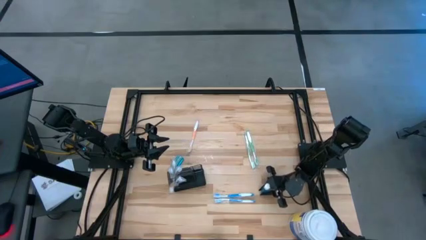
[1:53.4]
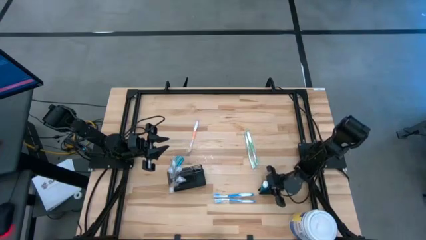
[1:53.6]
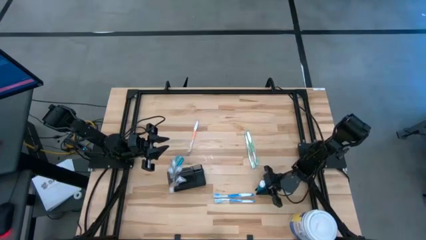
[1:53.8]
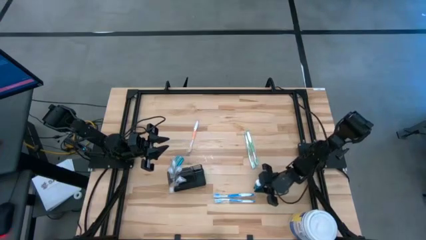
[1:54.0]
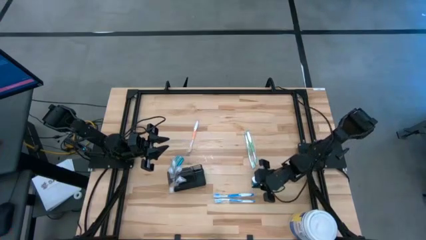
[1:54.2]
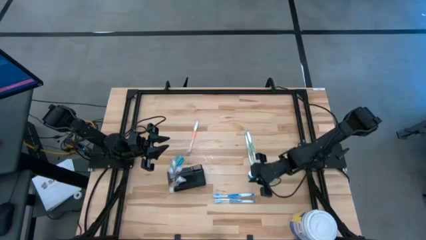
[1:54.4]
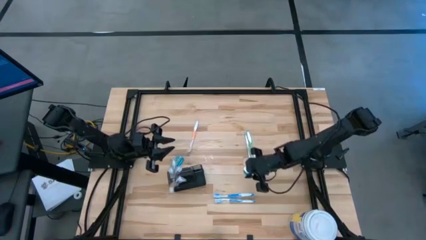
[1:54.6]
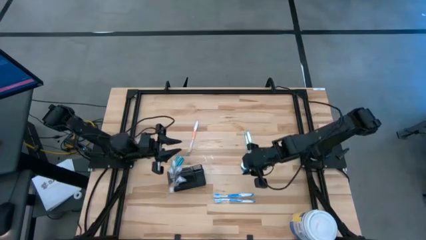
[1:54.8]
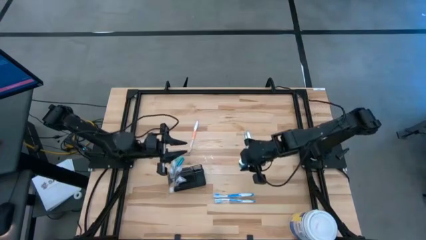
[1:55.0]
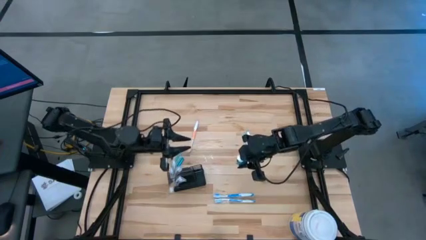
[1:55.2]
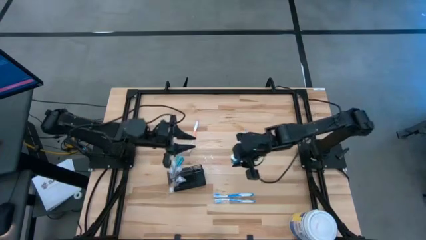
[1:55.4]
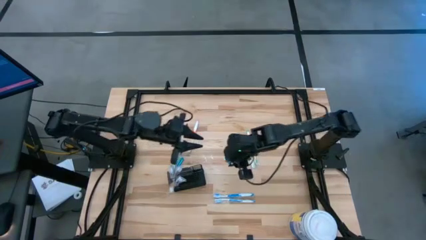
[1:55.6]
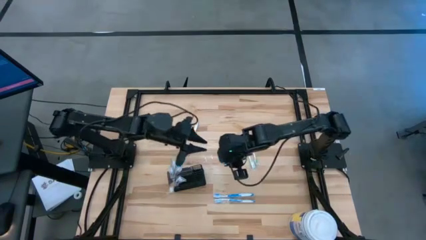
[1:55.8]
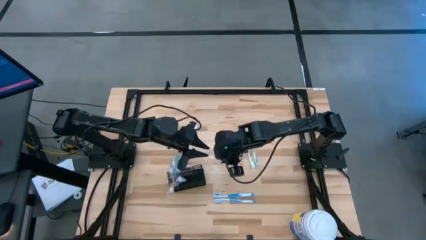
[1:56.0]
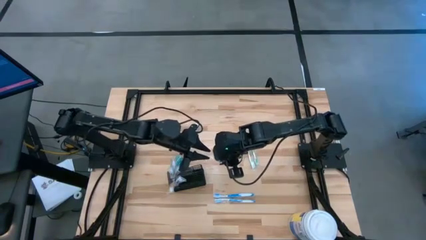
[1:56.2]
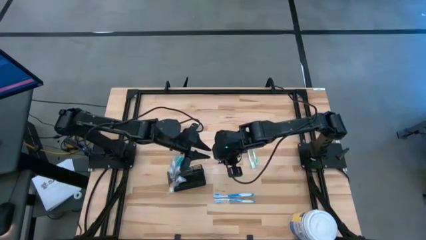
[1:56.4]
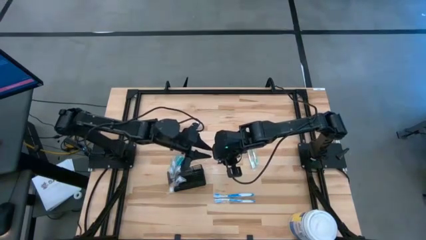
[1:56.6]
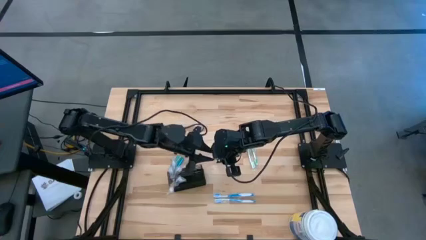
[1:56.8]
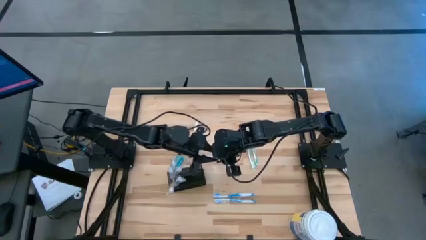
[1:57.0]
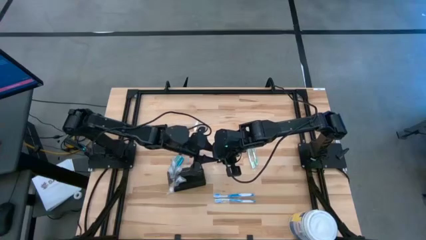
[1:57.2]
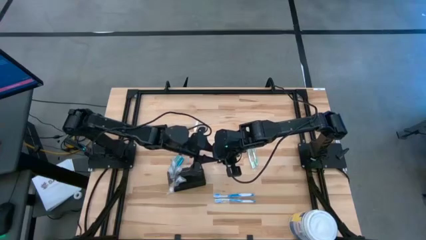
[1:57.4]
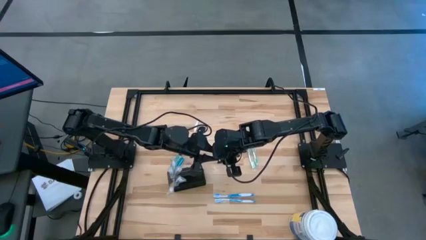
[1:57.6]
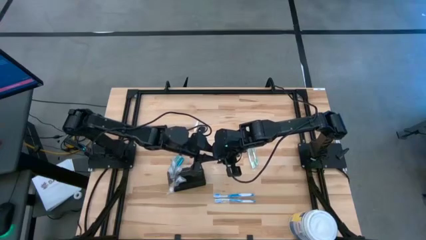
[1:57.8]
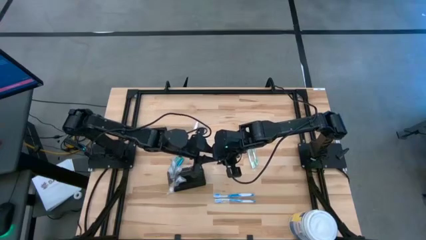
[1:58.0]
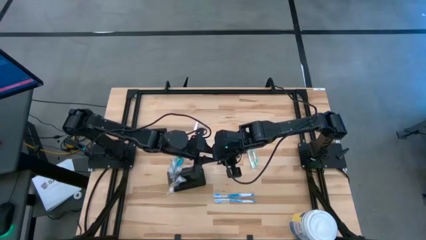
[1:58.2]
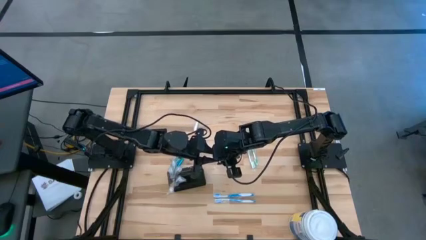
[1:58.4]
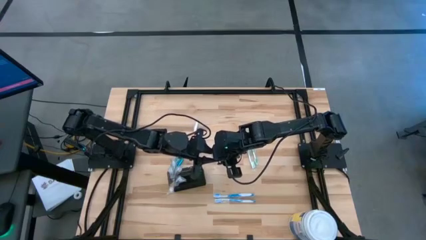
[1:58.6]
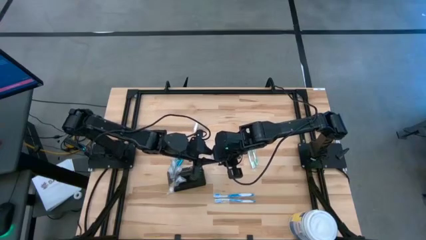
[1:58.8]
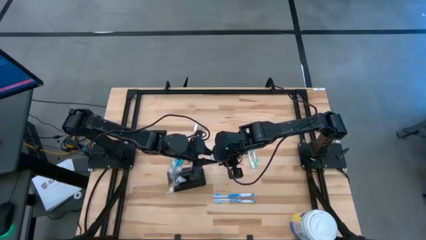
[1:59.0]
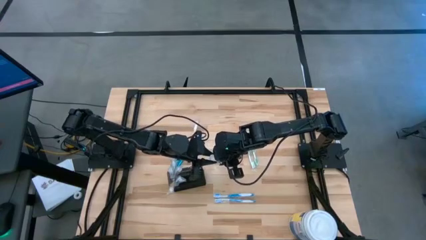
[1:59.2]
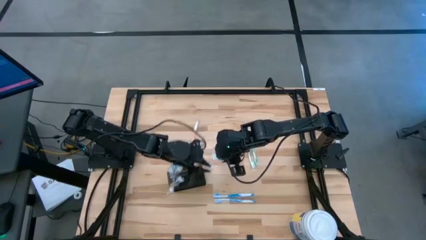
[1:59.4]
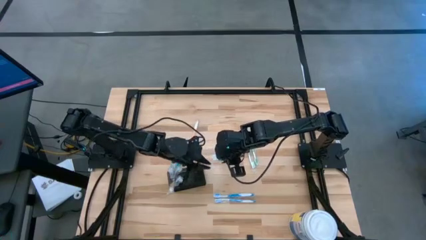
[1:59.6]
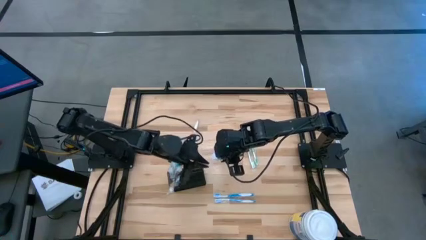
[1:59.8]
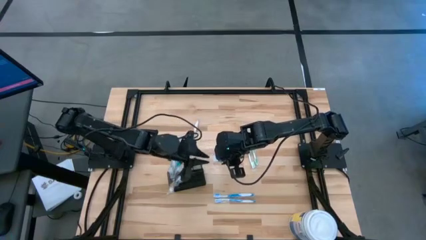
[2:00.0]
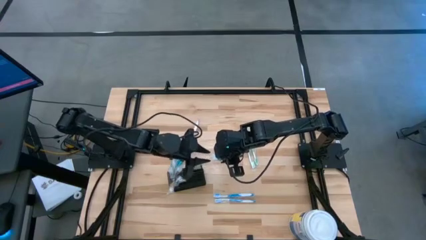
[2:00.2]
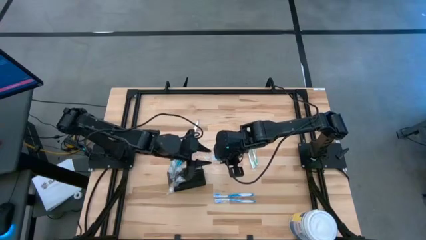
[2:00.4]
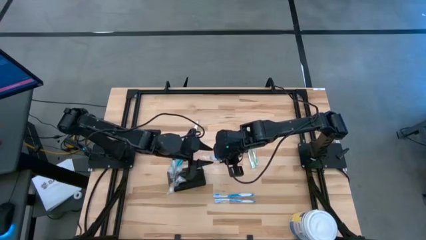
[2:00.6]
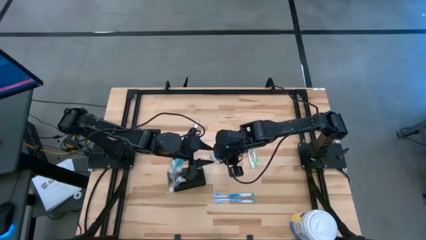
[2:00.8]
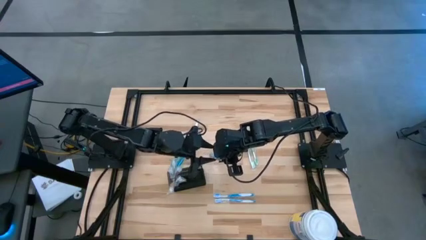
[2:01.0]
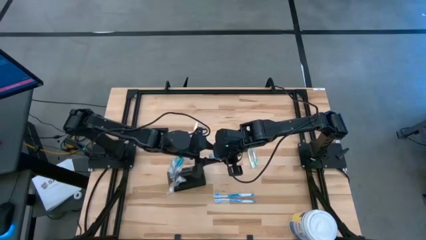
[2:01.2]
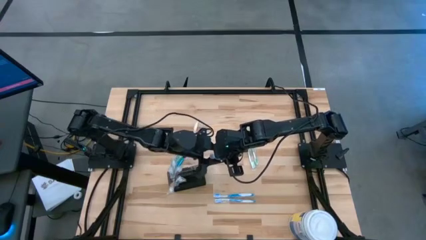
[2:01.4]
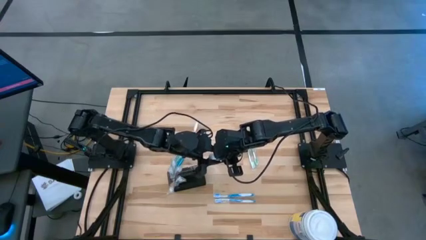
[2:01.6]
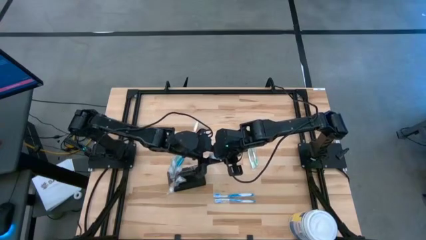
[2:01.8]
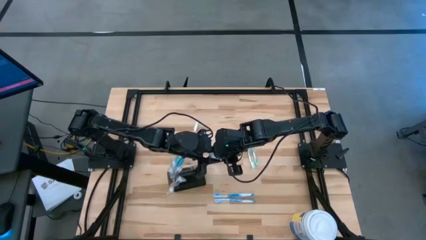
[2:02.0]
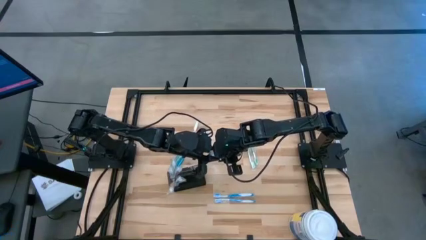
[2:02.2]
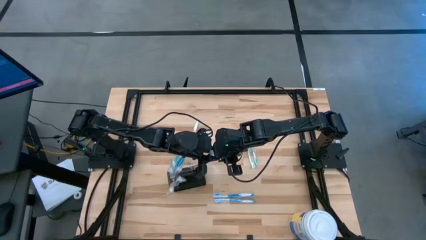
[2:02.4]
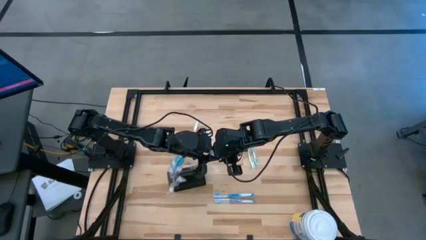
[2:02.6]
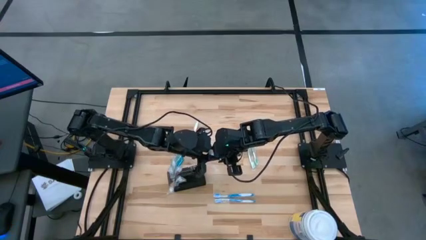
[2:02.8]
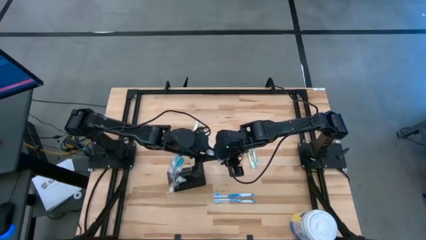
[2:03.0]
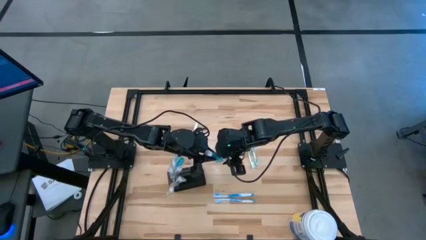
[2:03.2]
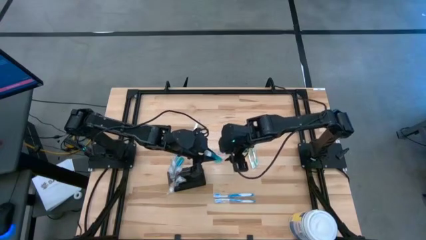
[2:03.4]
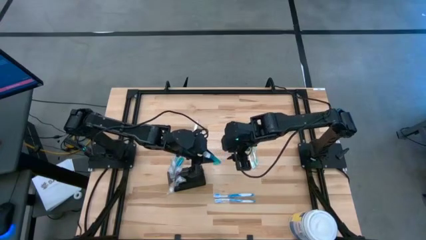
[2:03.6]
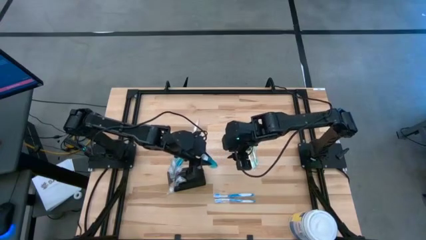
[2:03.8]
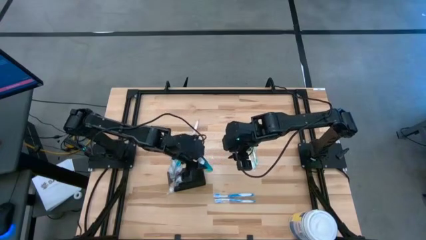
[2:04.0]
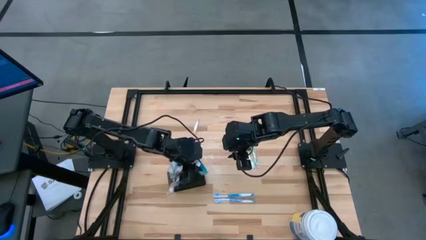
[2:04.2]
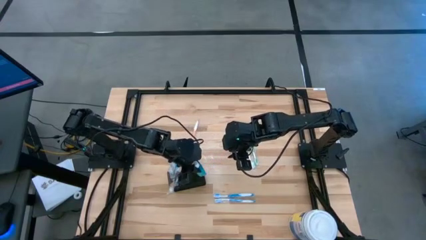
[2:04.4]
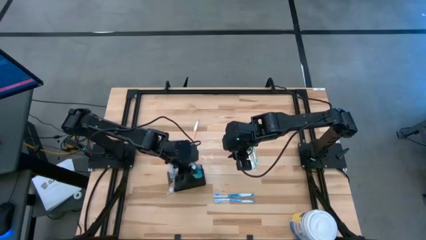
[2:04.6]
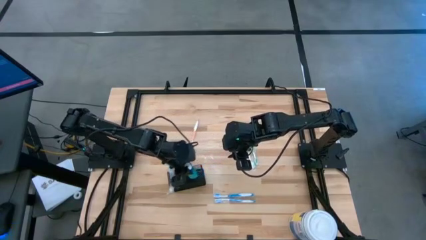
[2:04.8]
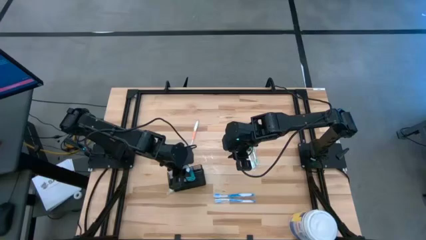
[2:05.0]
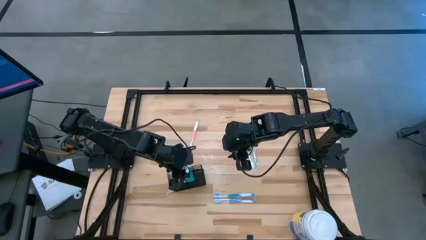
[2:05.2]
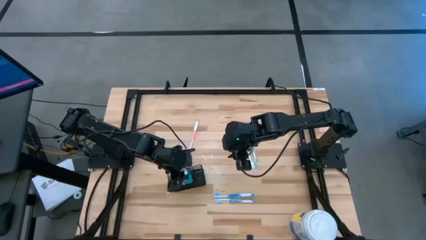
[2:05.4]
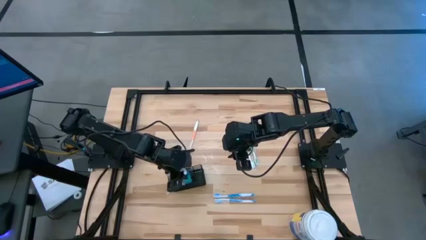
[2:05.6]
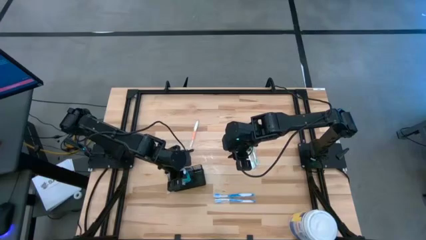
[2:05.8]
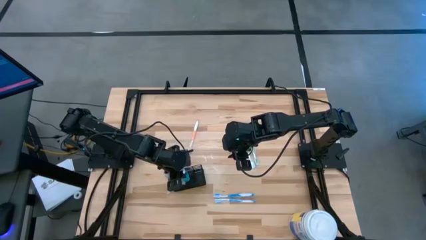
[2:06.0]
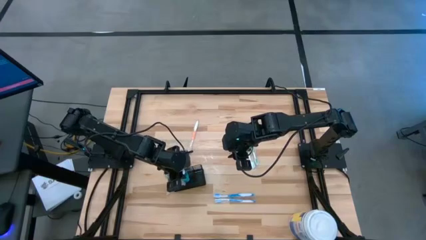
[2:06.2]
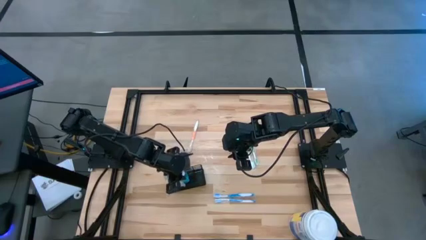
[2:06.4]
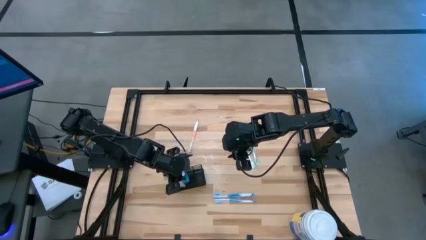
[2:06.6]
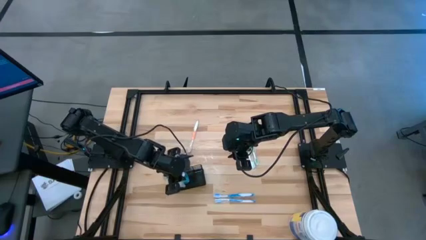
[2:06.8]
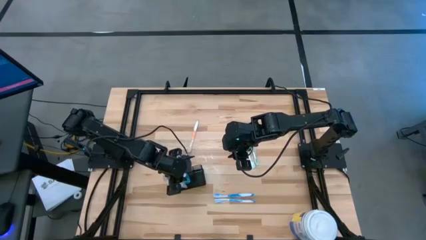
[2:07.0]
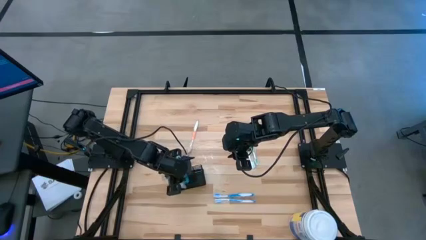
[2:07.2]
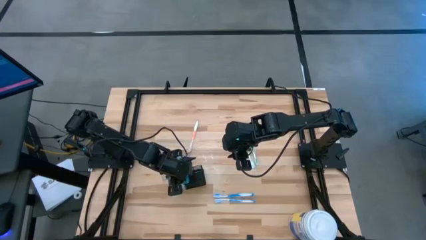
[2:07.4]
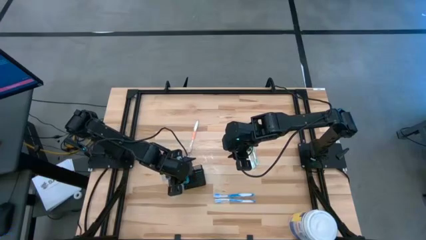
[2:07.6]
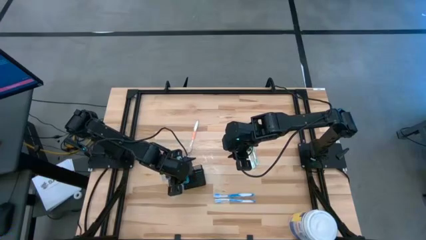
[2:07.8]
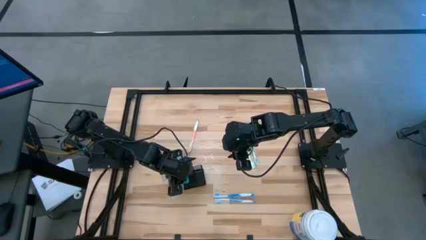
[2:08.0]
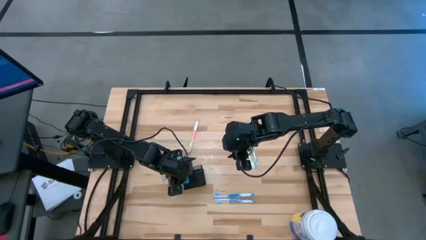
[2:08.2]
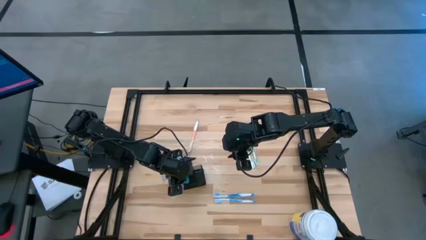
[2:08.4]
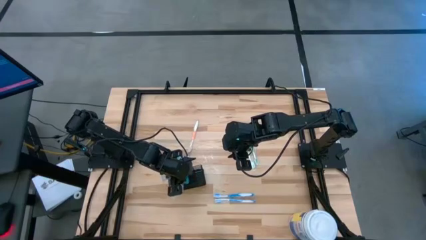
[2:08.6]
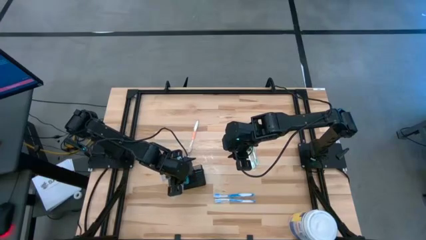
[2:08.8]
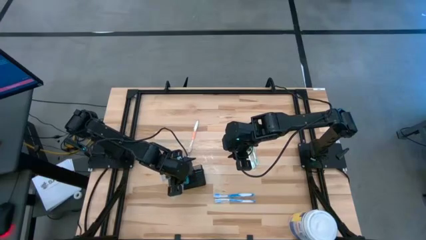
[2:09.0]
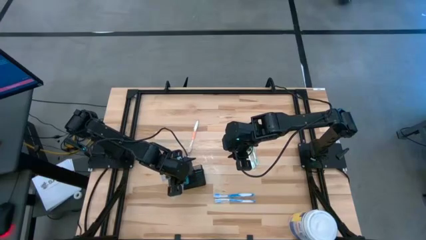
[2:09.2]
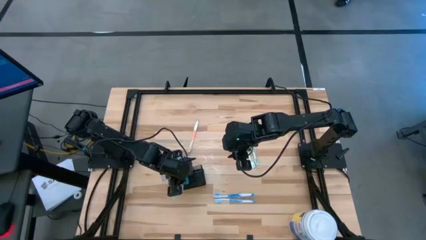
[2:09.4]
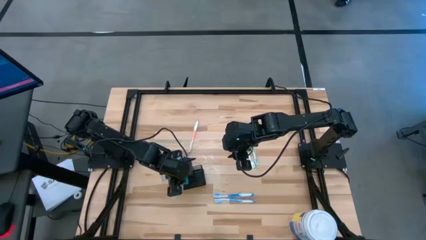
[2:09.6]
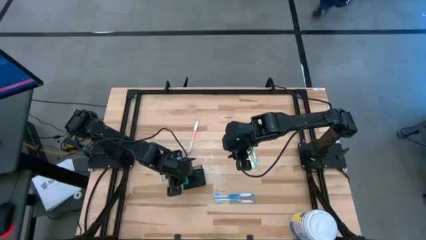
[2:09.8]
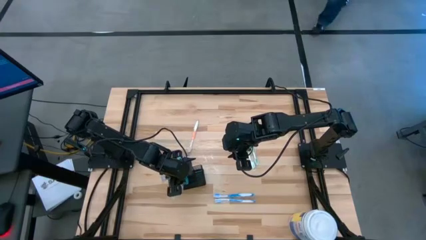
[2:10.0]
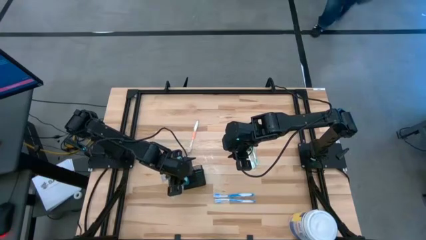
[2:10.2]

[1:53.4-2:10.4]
Task: Pick & Place toothbrushing station
Put the mouthwash into the black toothbrush rack
